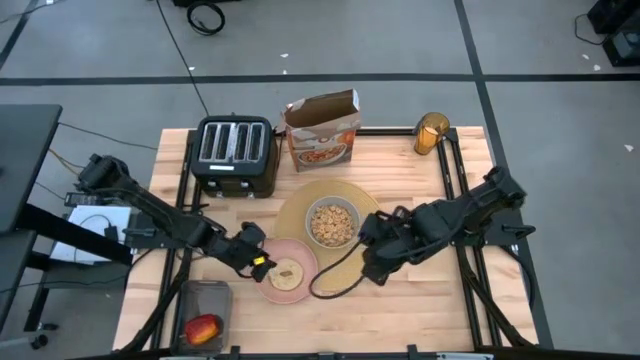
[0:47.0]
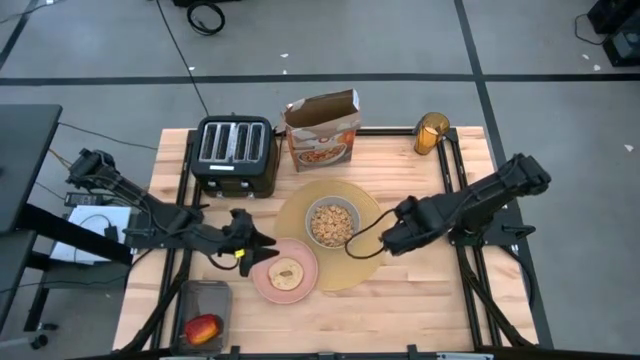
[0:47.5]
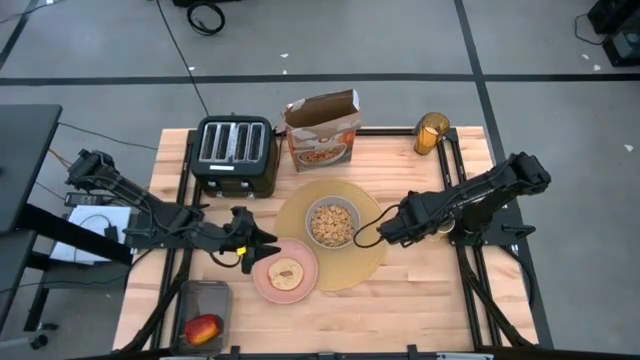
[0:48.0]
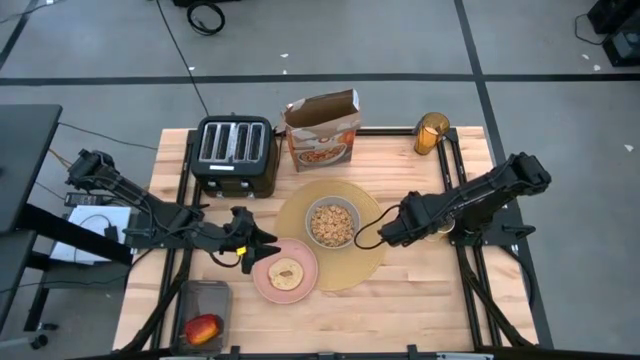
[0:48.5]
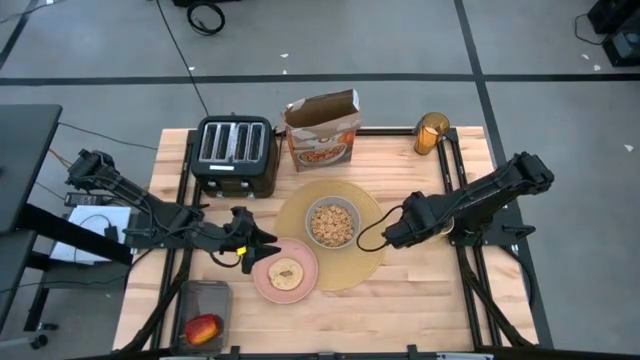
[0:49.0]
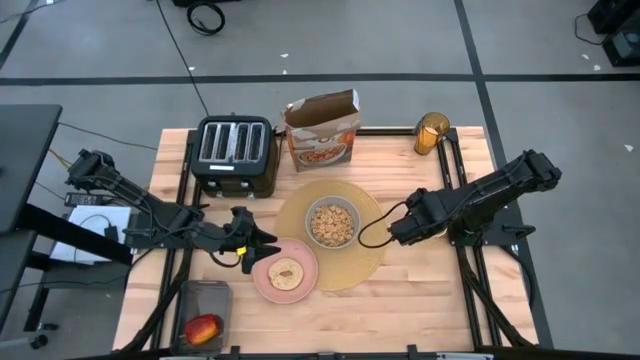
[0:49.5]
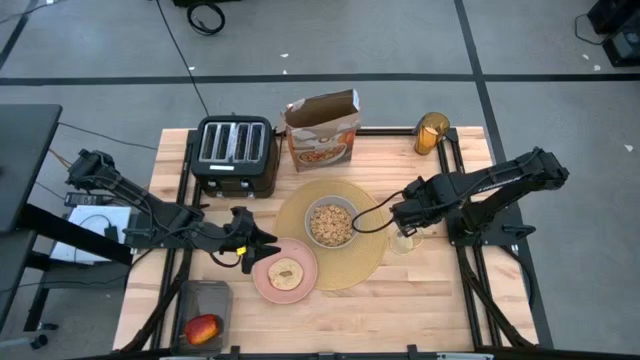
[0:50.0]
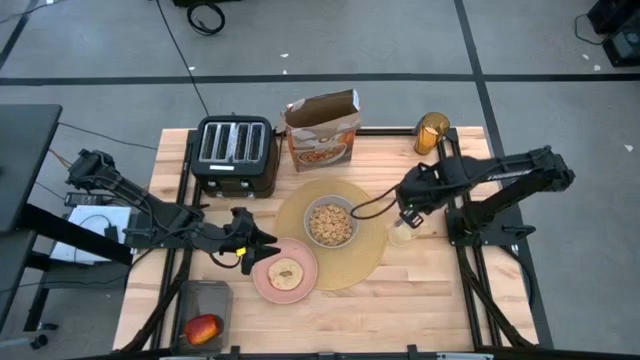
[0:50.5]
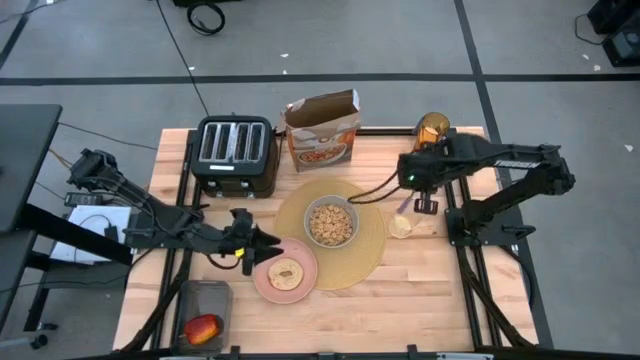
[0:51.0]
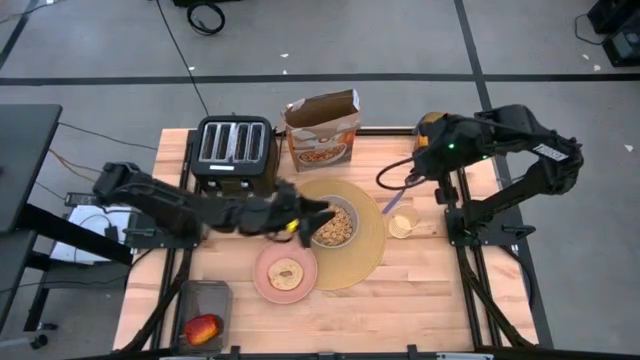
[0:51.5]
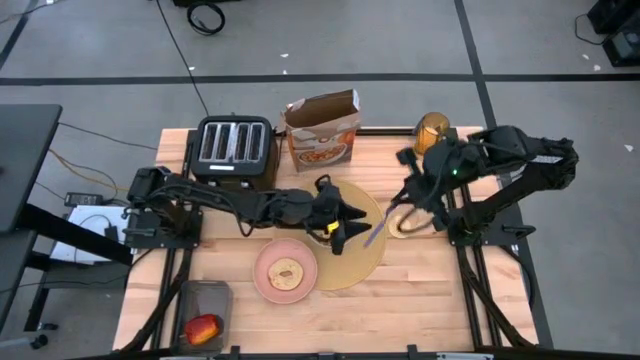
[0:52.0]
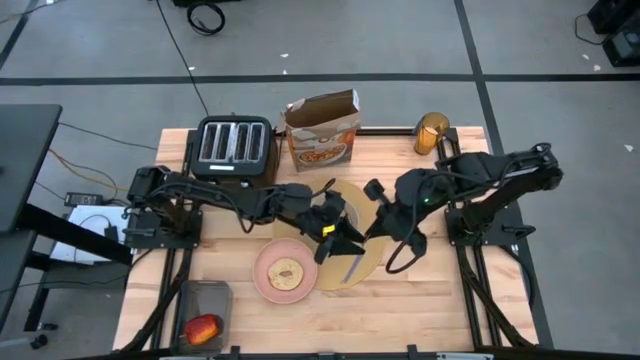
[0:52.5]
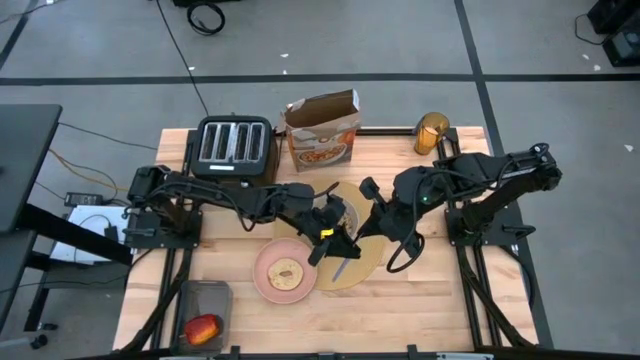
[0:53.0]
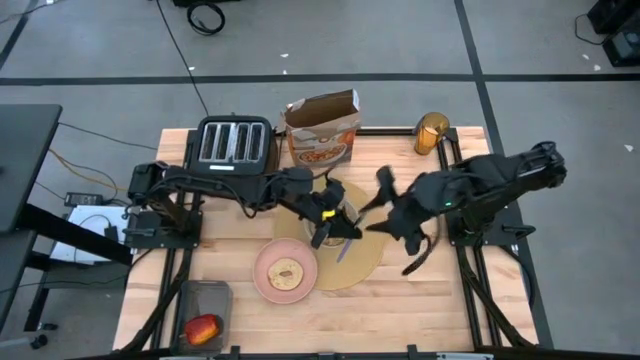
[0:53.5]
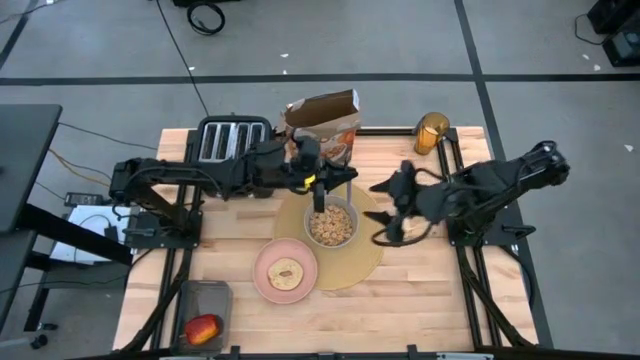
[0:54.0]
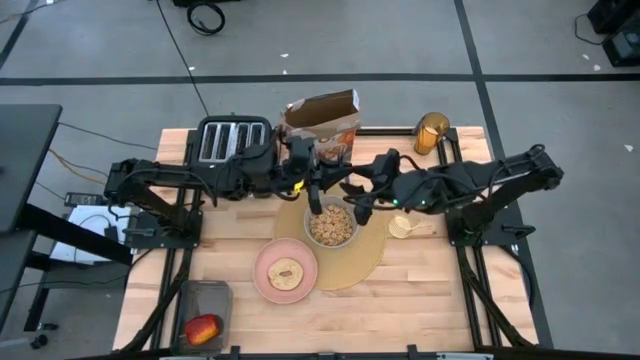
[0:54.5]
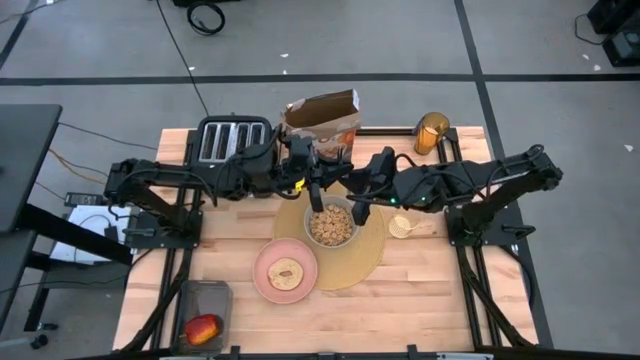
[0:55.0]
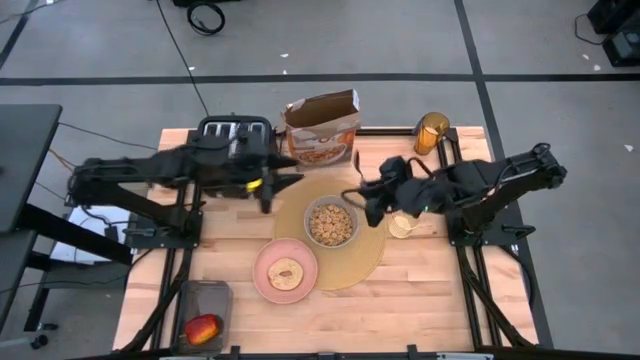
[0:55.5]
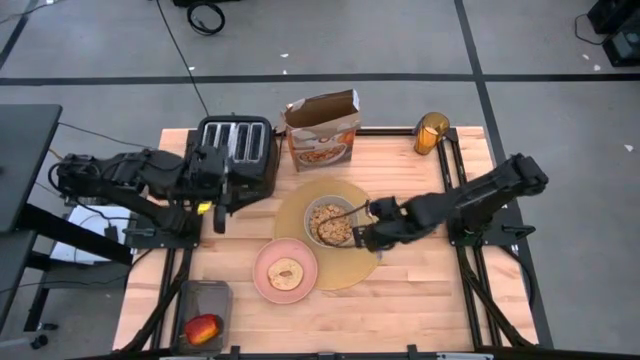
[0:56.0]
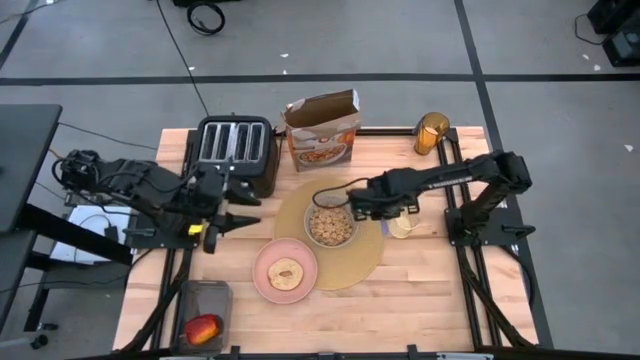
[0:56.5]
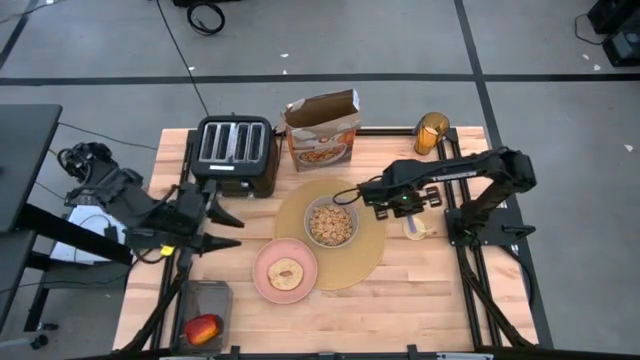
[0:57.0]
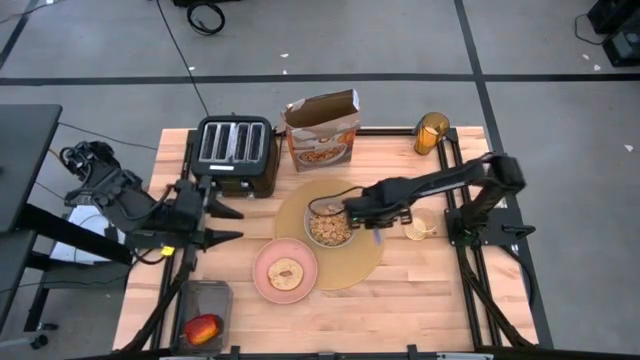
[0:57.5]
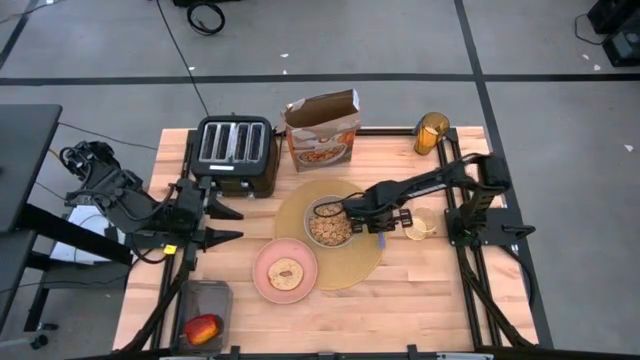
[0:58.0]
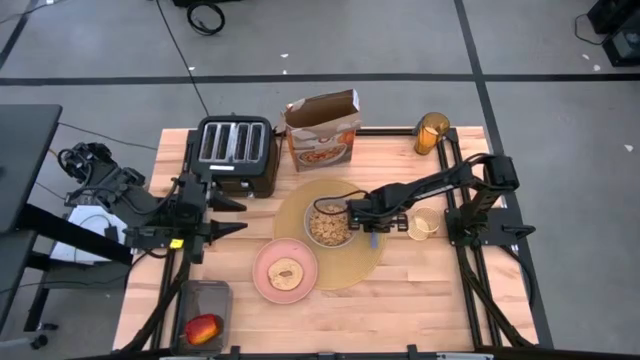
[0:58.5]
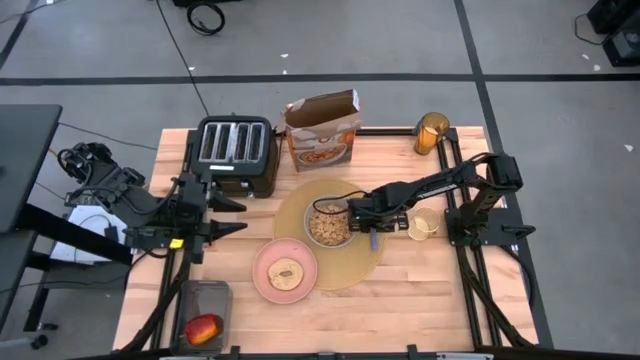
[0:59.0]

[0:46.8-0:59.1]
Task: Arrange a breakfast setting
Put the purple spoon from the gold pen holder on the brown table mat to the left of the gray bowl

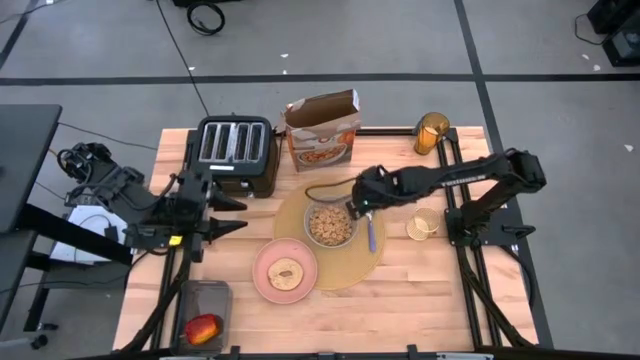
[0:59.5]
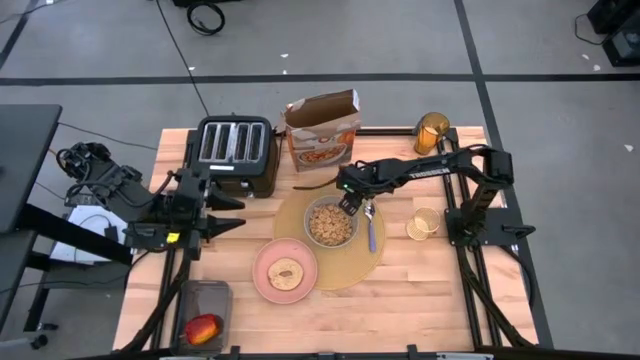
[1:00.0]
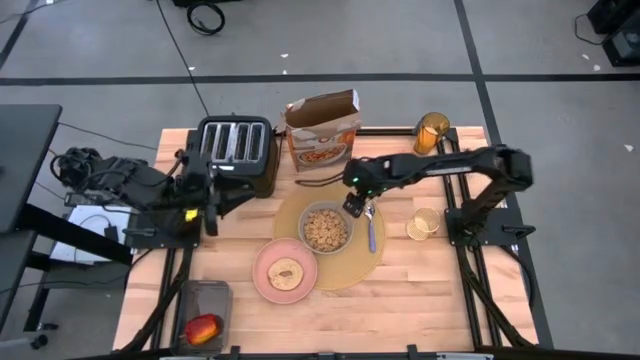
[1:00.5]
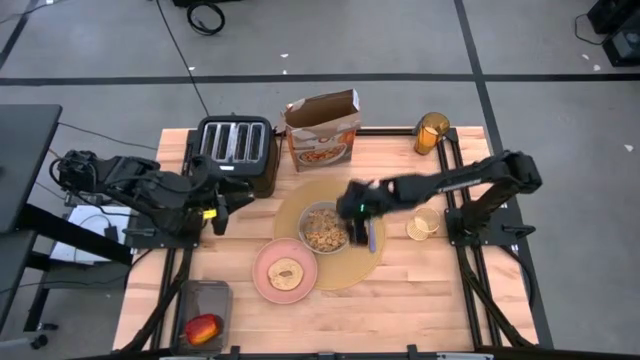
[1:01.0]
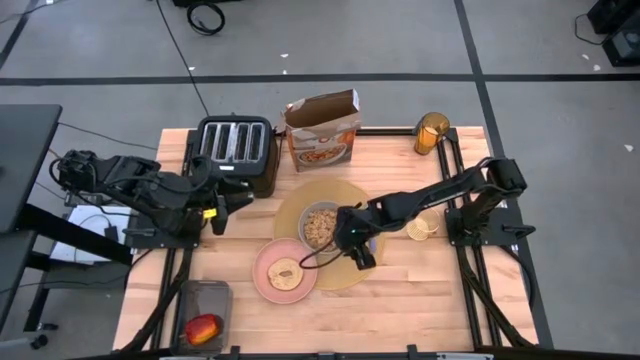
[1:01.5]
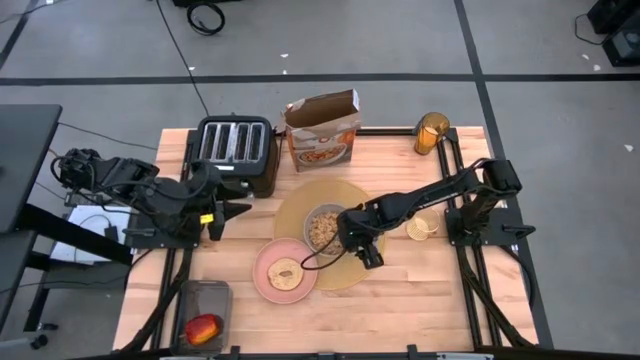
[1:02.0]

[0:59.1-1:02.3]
Adjust the gray bowl on the brown table mat

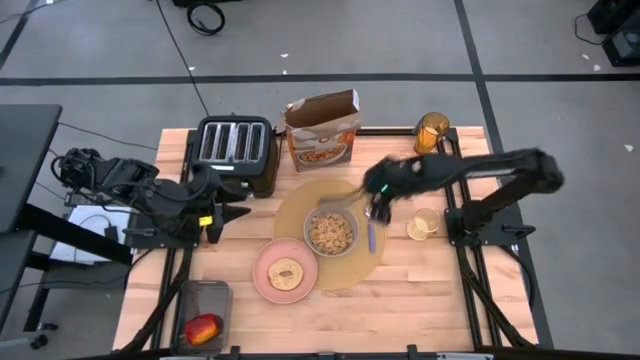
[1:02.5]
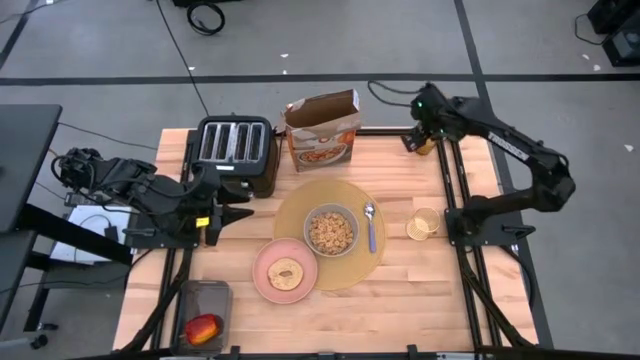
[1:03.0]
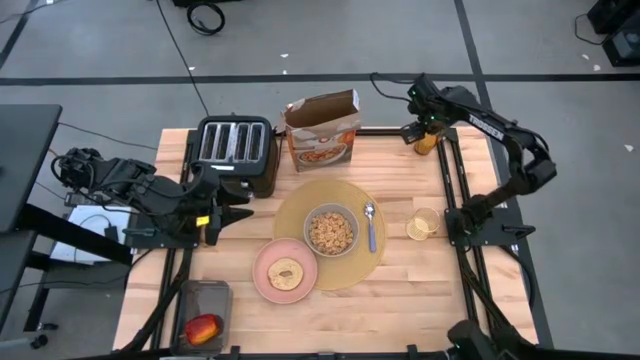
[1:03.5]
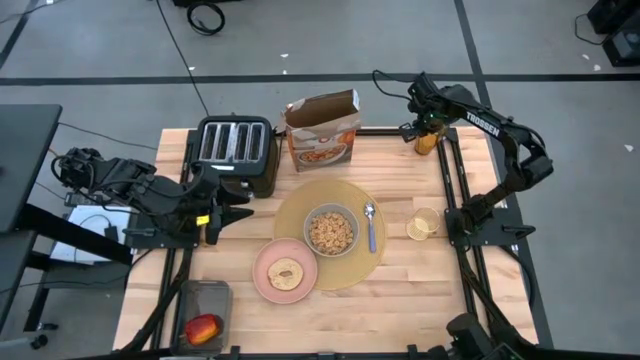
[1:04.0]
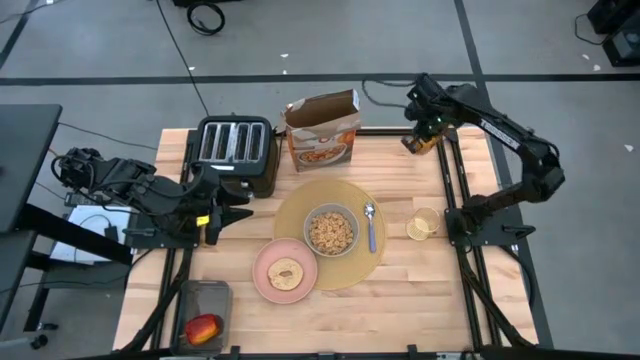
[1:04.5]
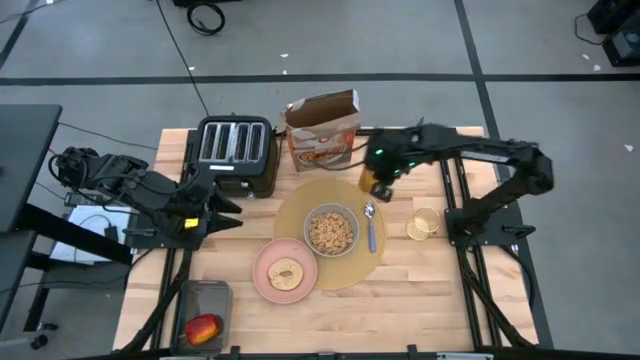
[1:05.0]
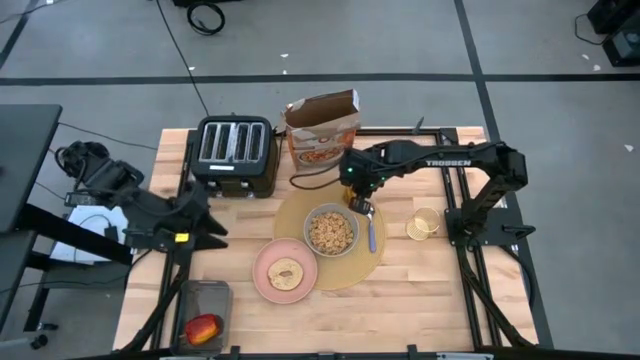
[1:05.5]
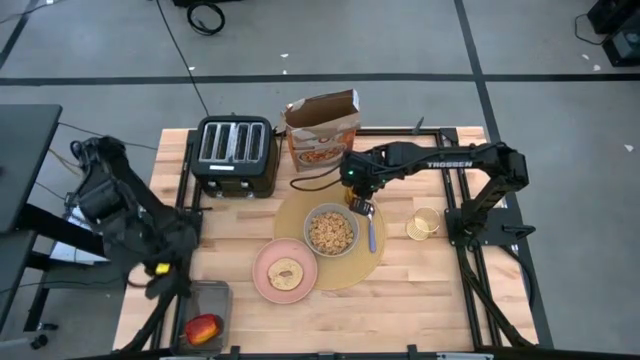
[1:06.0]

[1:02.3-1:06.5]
Put the orange cup of grain rice on the brown table mat to the top right of the gray bowl

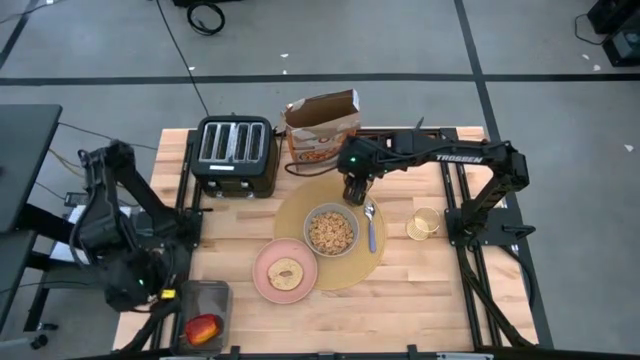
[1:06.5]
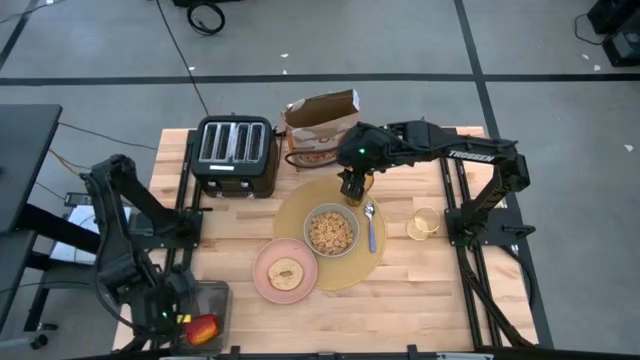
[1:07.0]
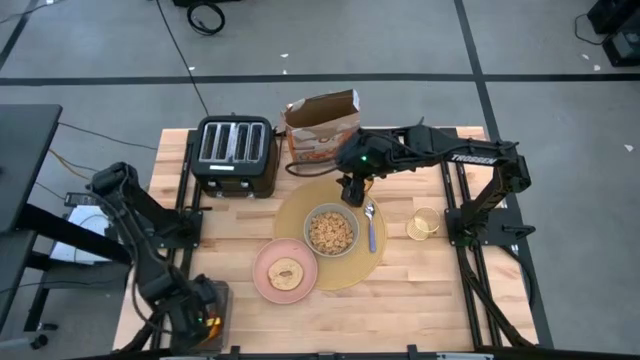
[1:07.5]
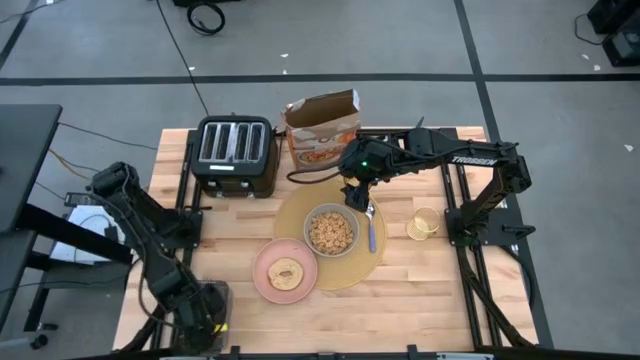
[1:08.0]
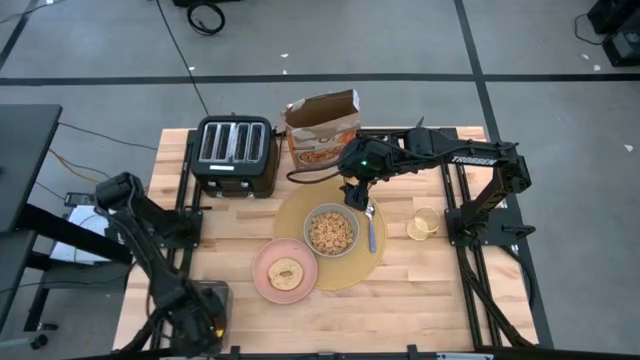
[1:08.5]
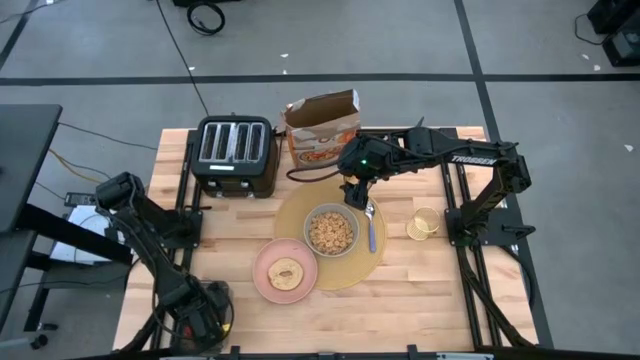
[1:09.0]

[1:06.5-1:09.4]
Put the apple from the black bin on the brown table mat to the top left of the gray bowl
